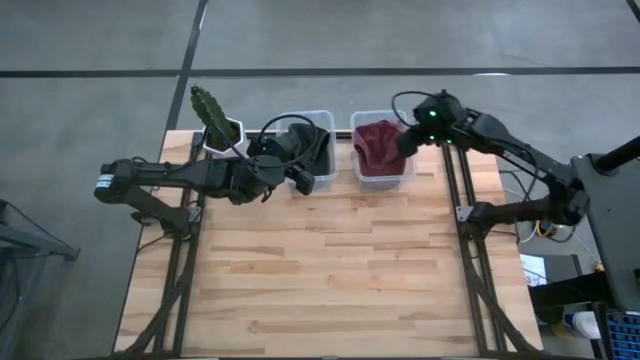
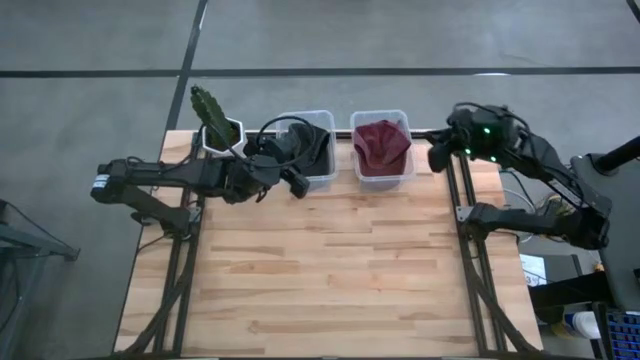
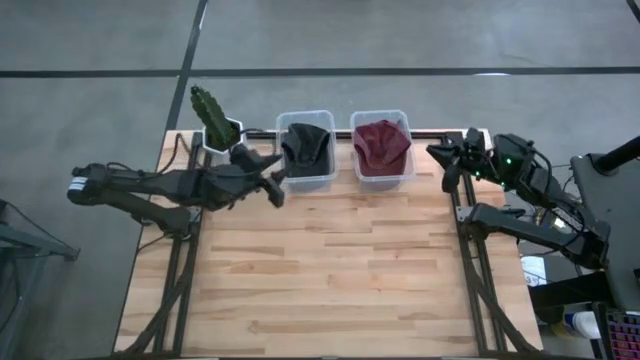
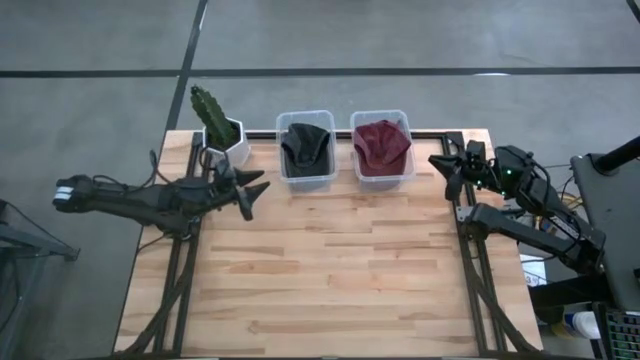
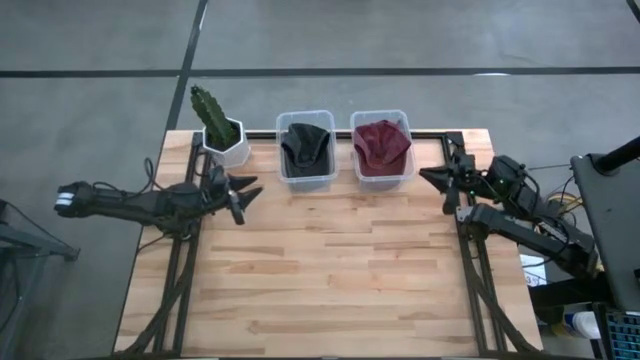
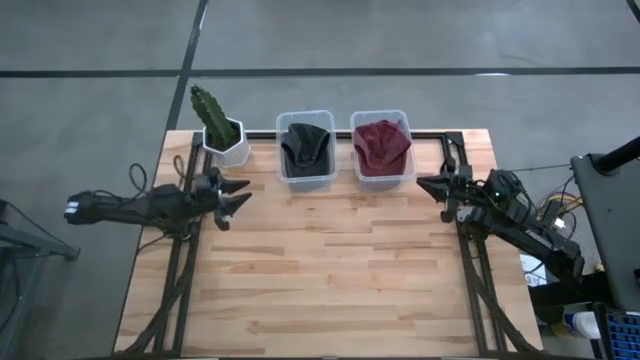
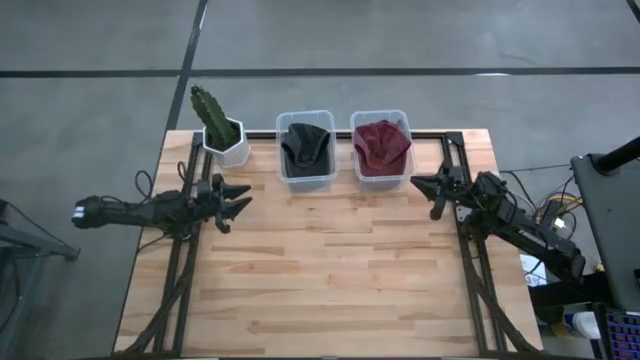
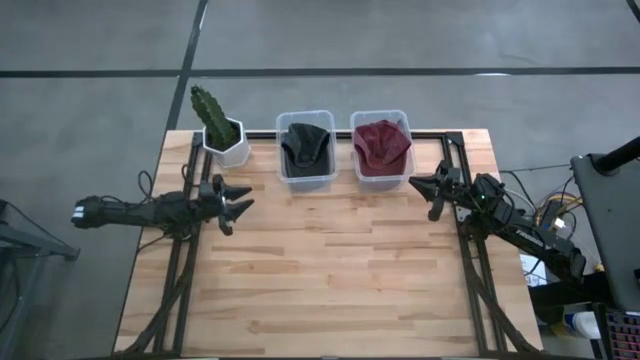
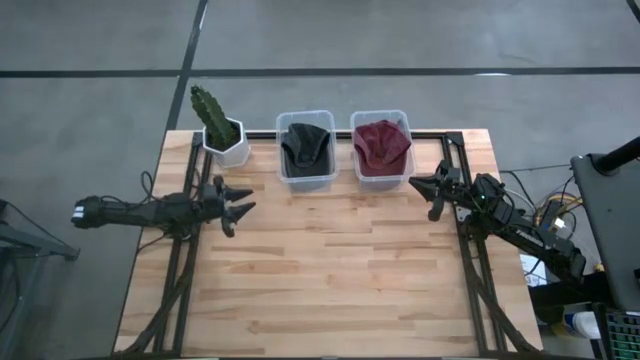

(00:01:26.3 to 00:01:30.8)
Task: Pick & Place hat
Return to Home Position

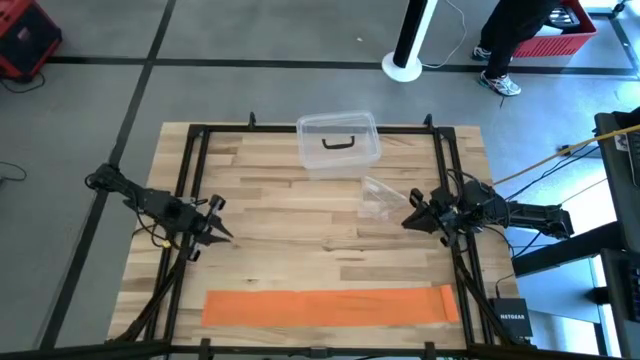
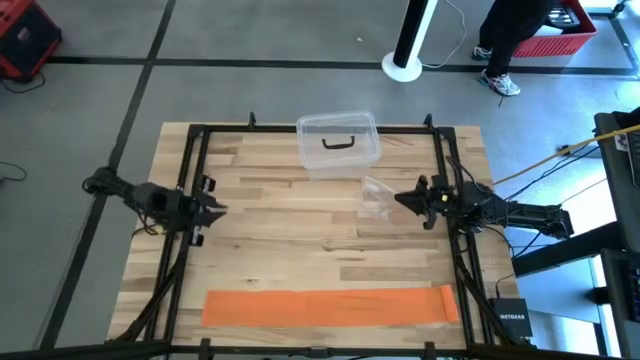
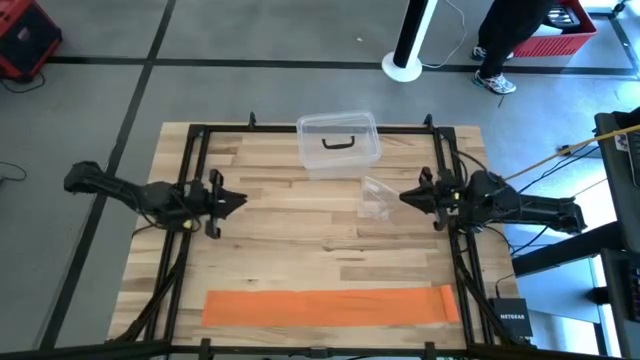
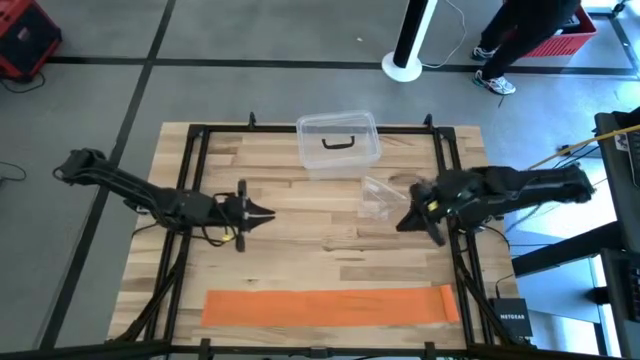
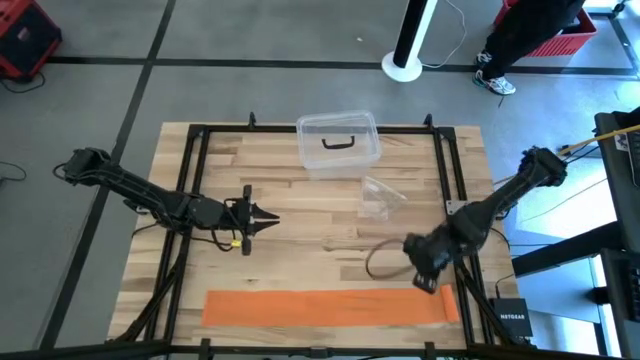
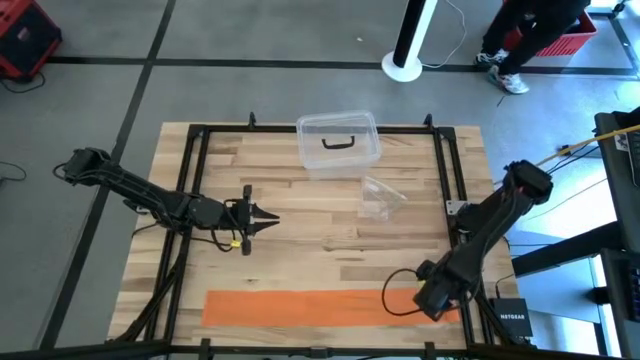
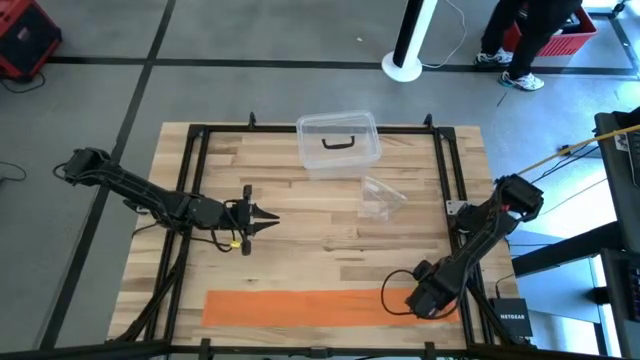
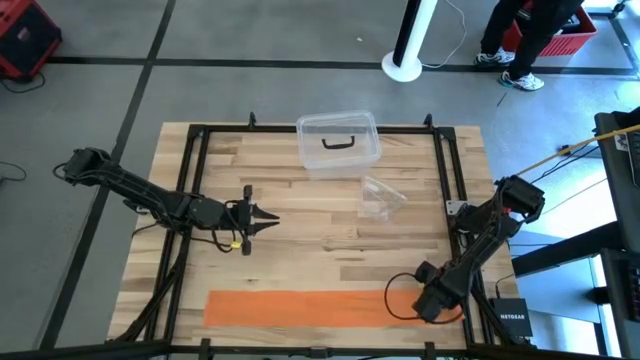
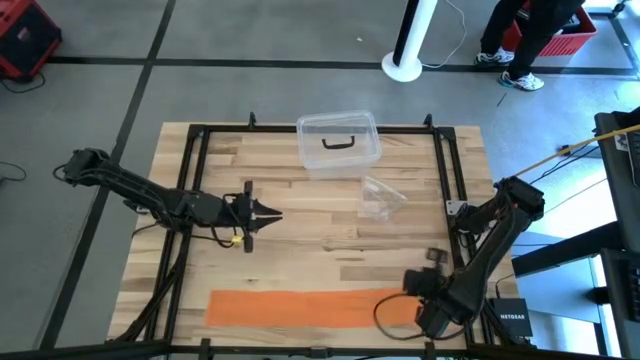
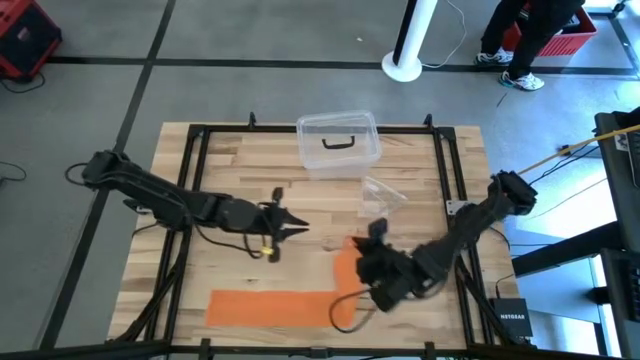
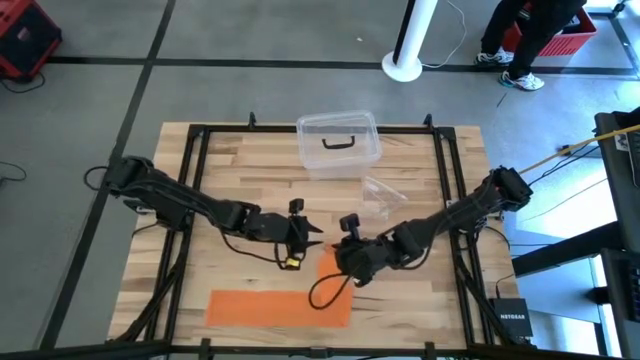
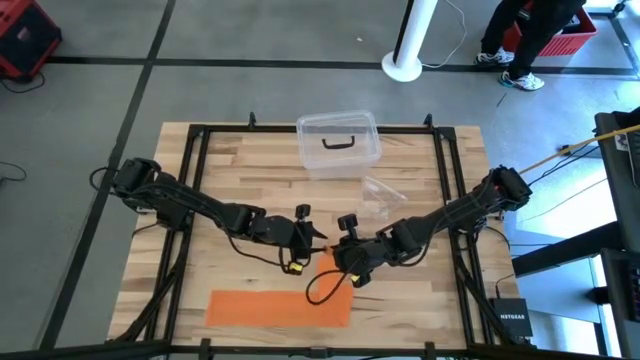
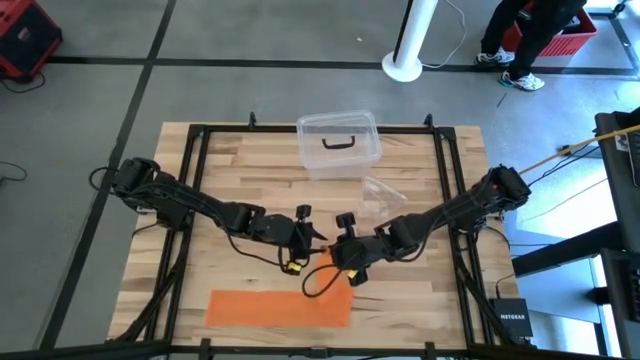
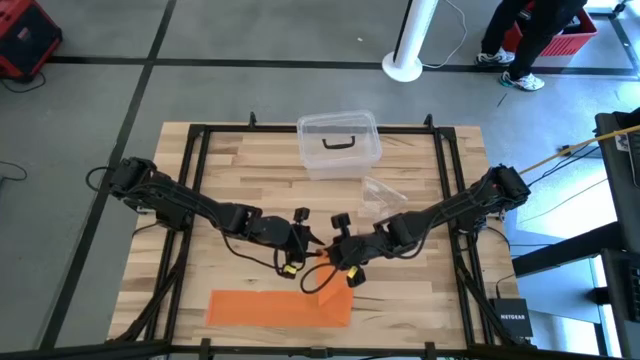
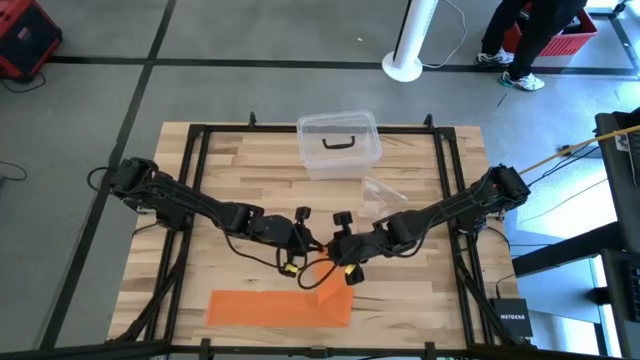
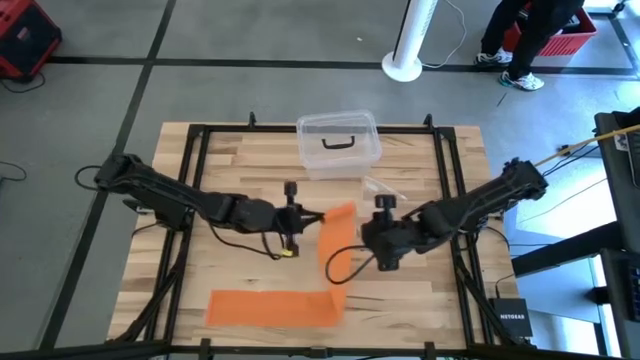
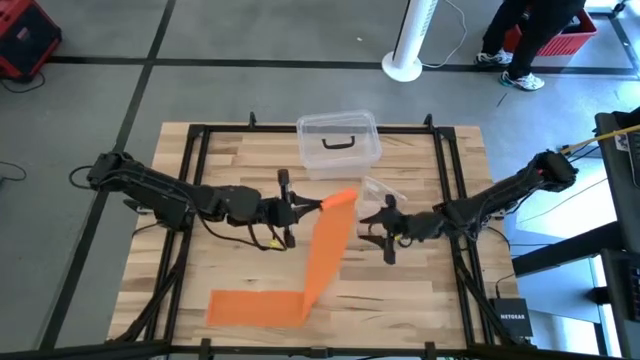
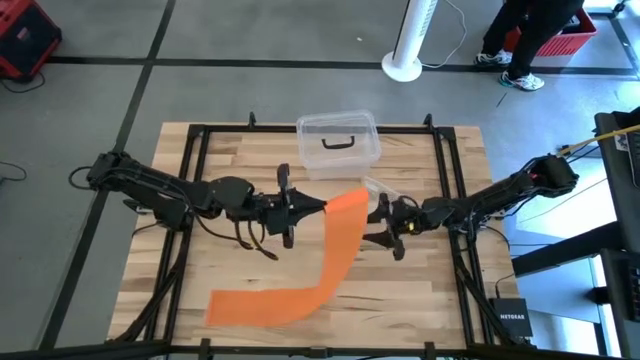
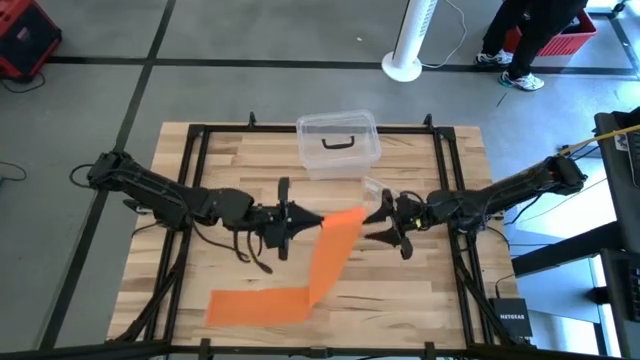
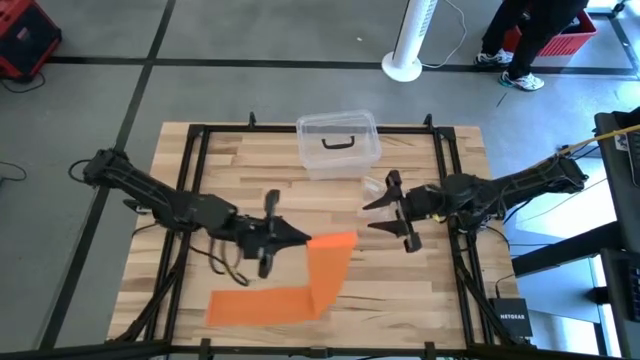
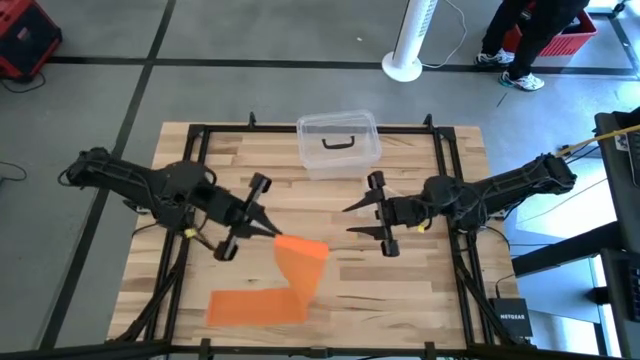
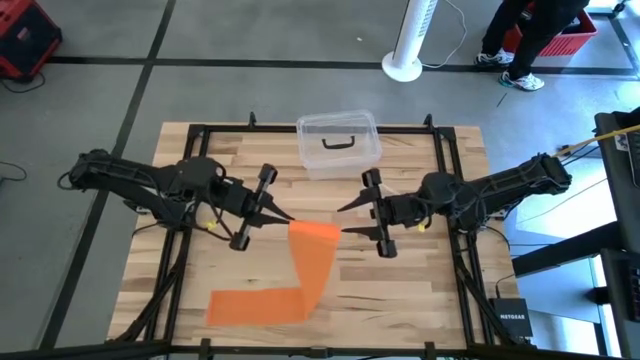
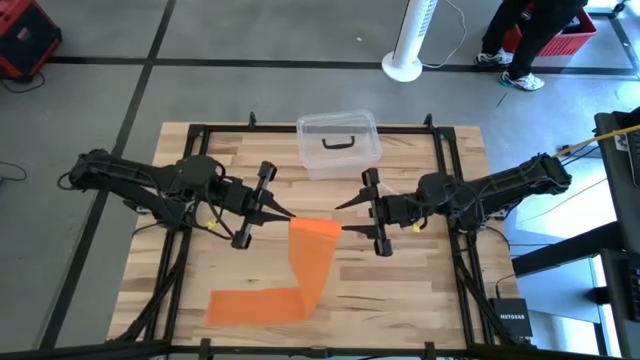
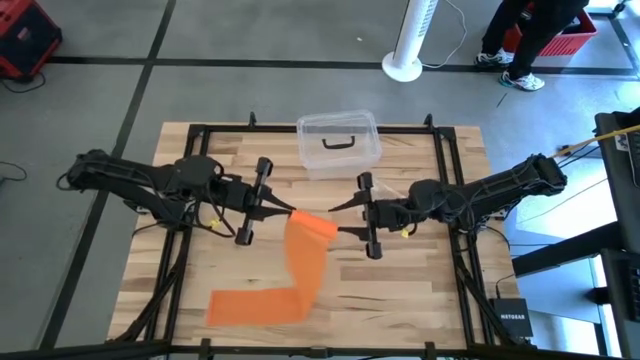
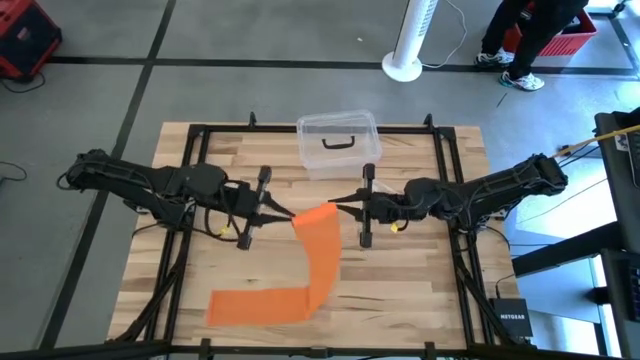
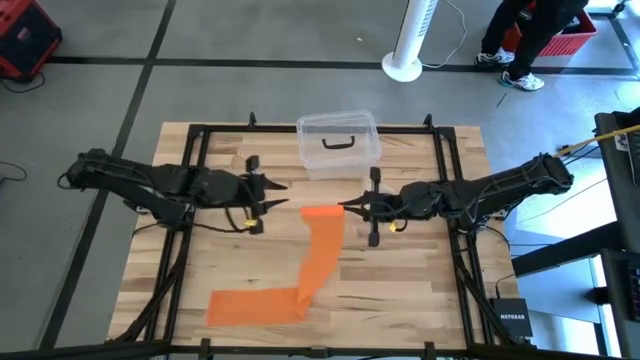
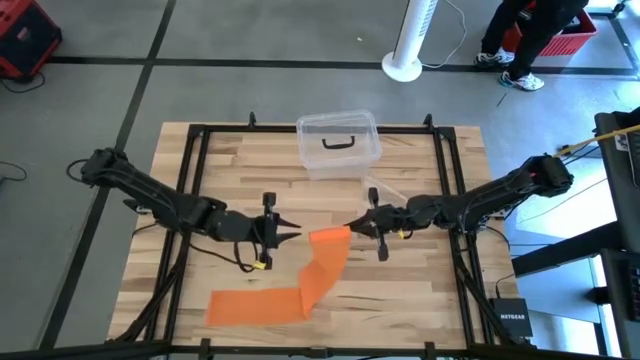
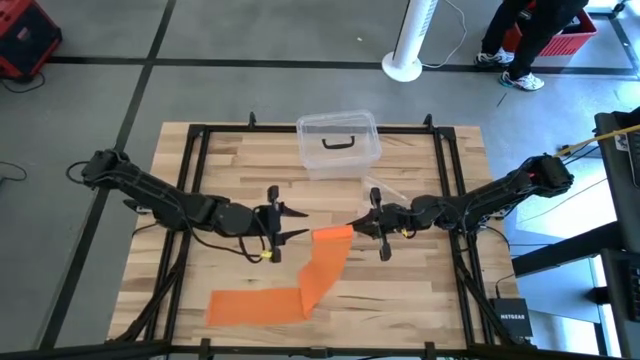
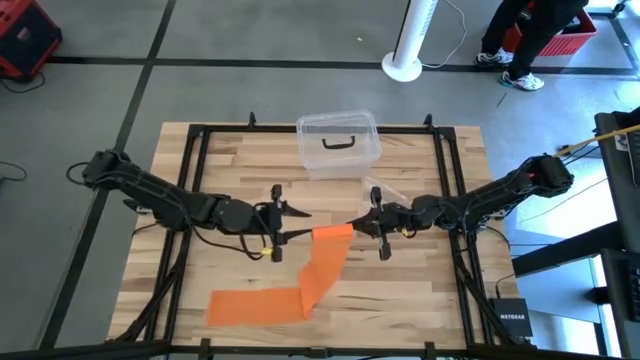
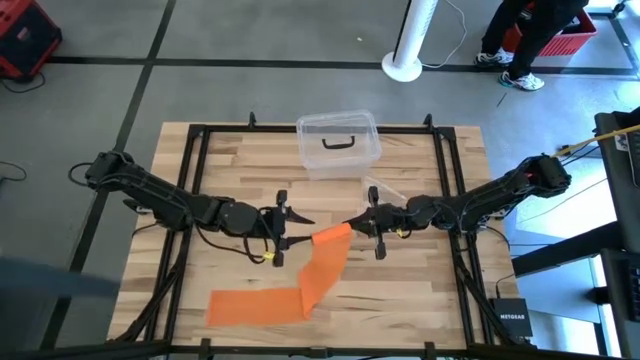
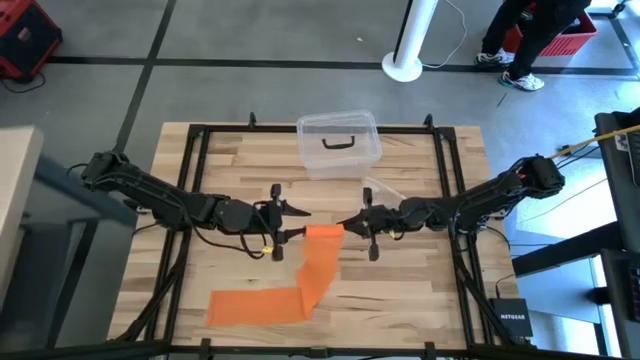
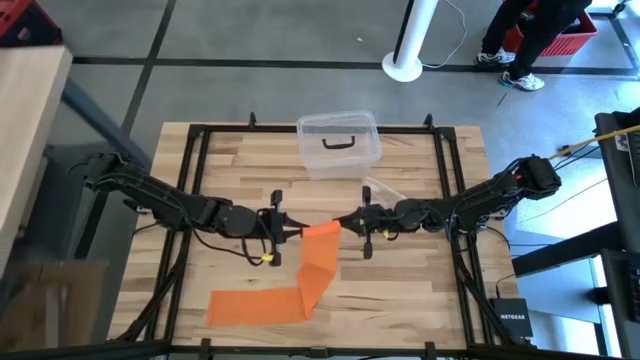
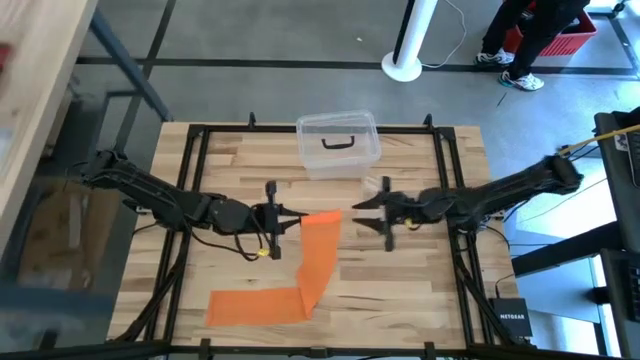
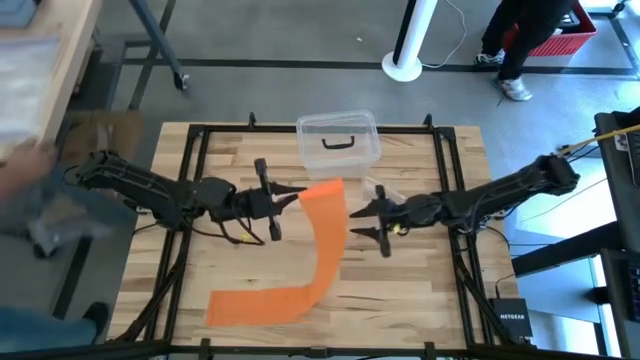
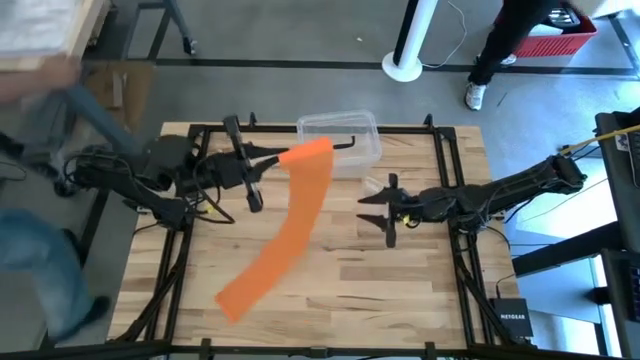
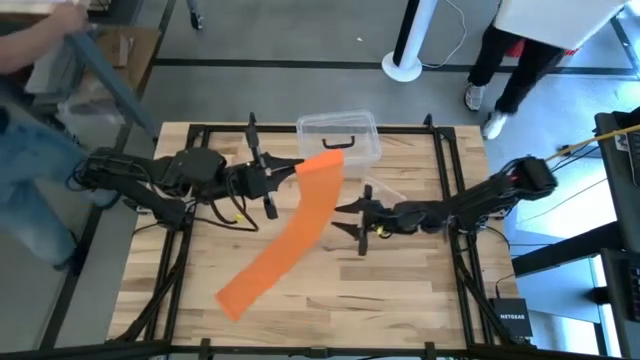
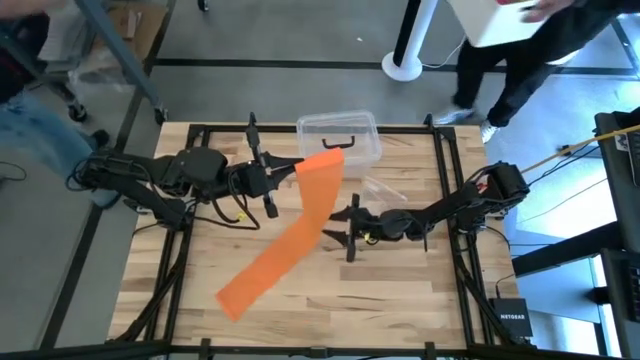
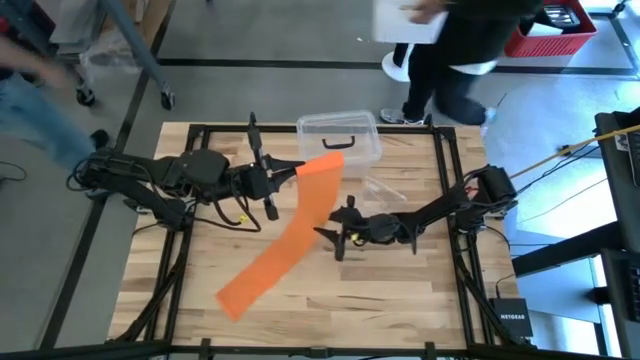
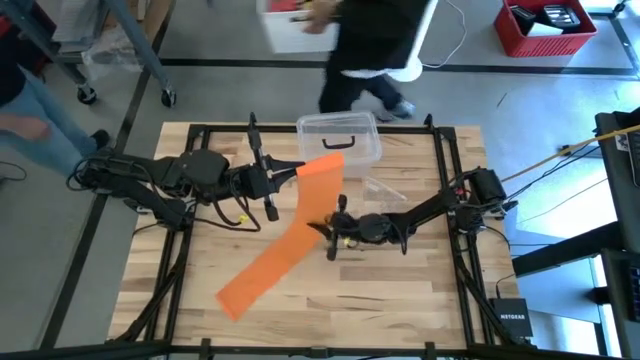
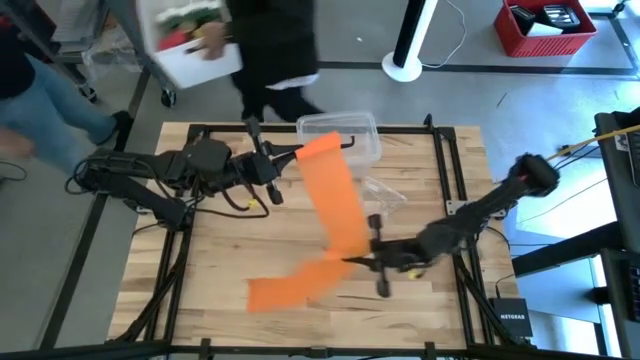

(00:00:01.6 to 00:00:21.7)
Task: Roll bandage
Roll the orange bandage
